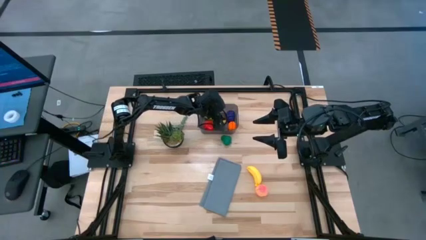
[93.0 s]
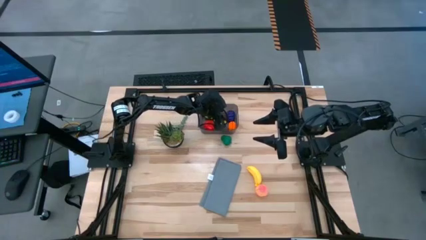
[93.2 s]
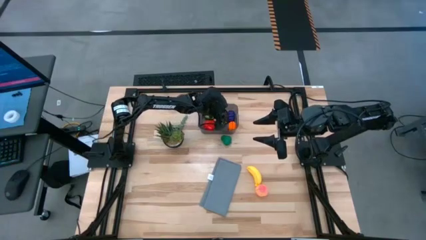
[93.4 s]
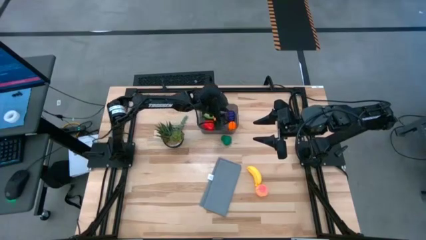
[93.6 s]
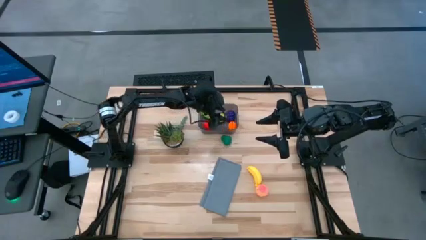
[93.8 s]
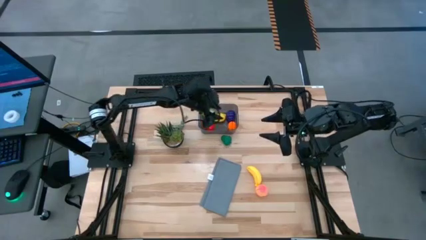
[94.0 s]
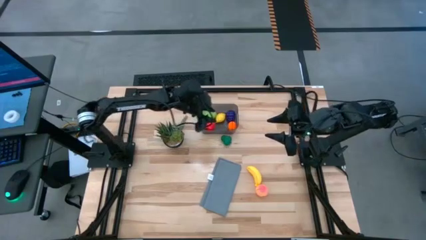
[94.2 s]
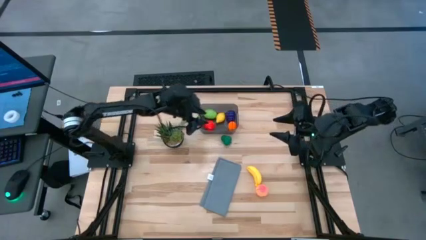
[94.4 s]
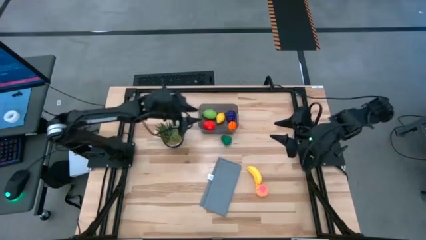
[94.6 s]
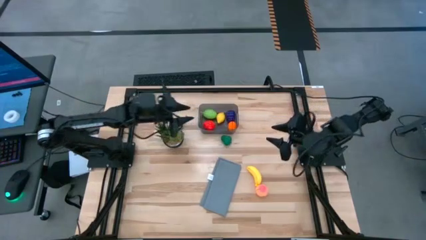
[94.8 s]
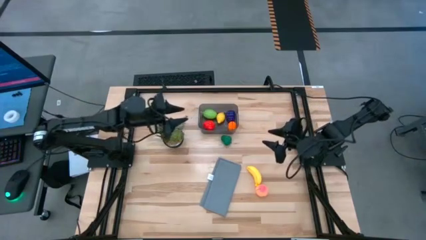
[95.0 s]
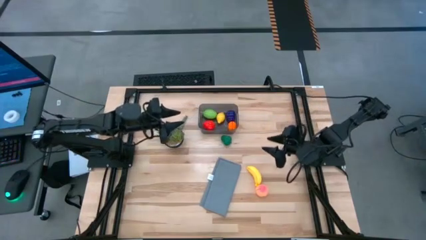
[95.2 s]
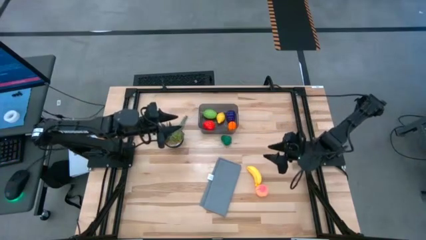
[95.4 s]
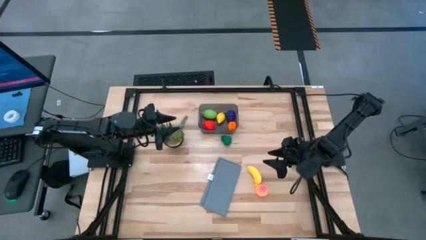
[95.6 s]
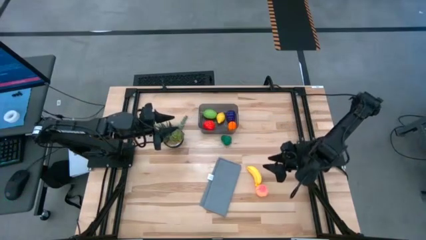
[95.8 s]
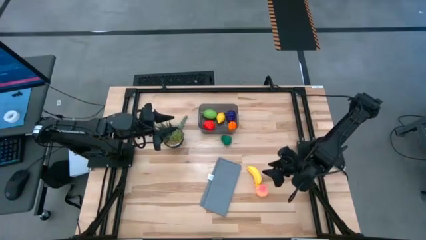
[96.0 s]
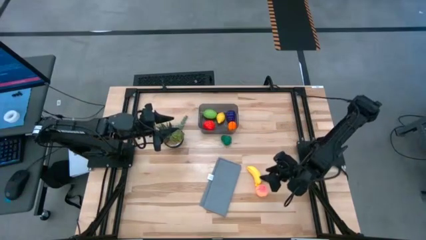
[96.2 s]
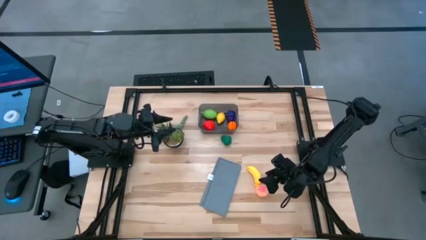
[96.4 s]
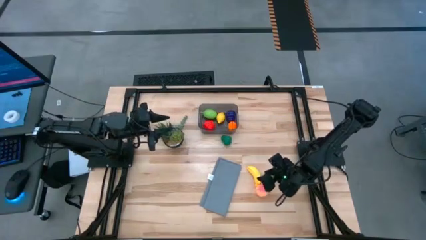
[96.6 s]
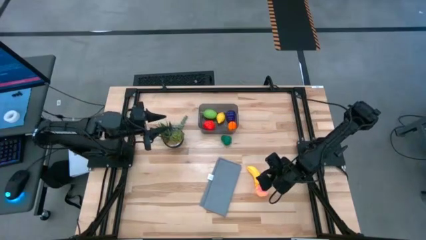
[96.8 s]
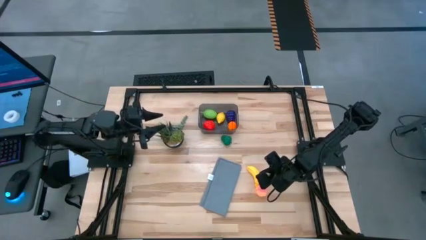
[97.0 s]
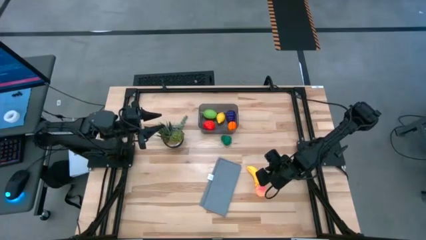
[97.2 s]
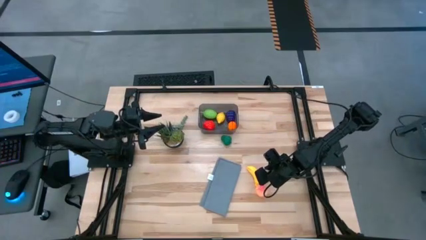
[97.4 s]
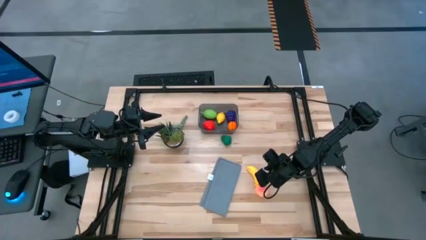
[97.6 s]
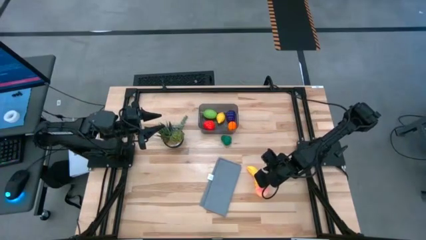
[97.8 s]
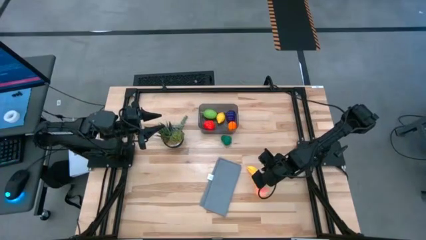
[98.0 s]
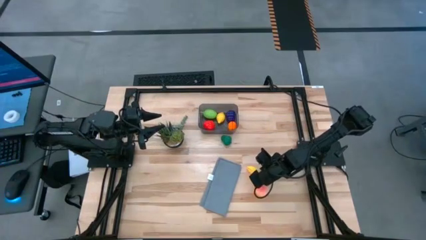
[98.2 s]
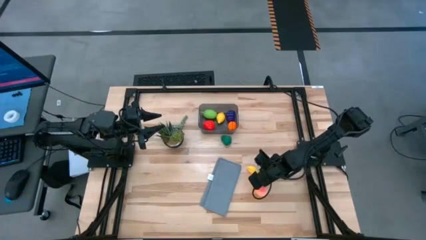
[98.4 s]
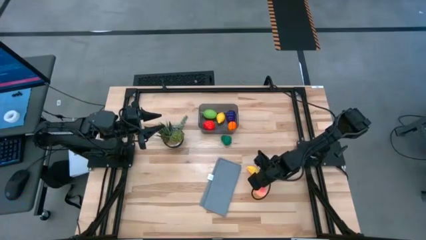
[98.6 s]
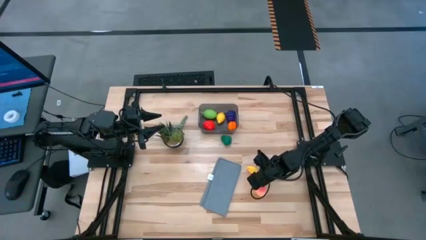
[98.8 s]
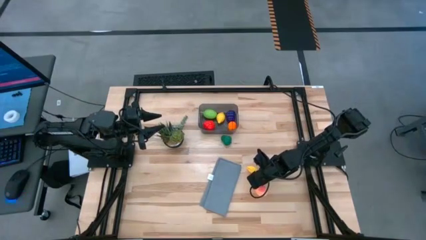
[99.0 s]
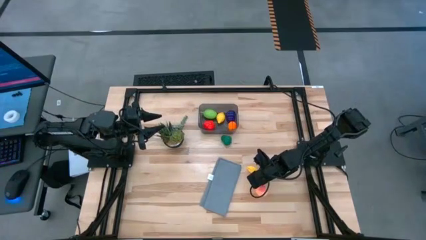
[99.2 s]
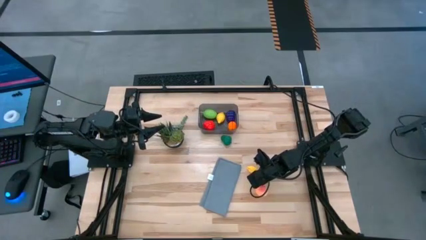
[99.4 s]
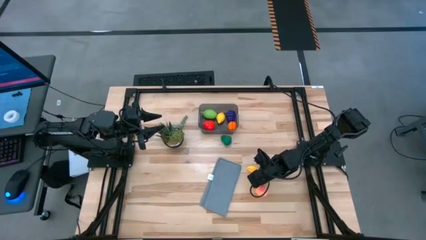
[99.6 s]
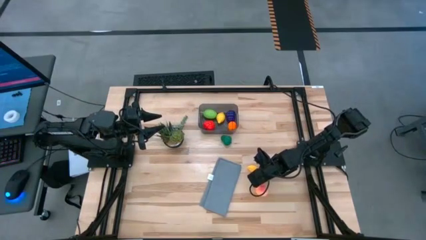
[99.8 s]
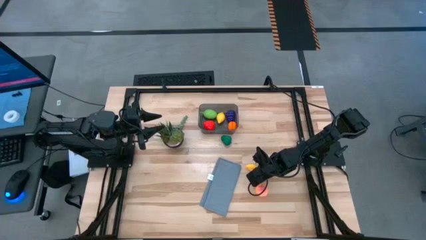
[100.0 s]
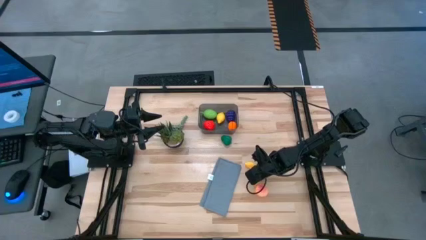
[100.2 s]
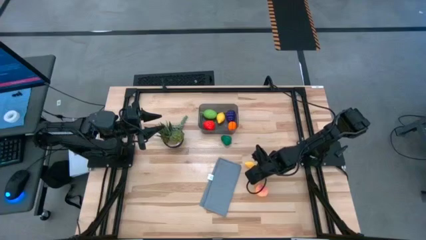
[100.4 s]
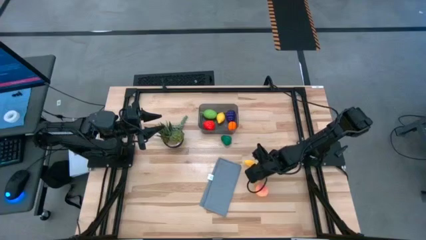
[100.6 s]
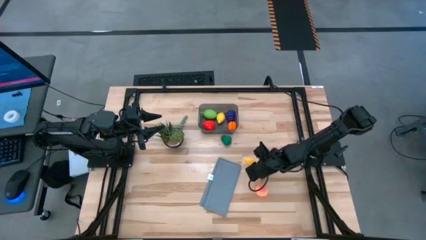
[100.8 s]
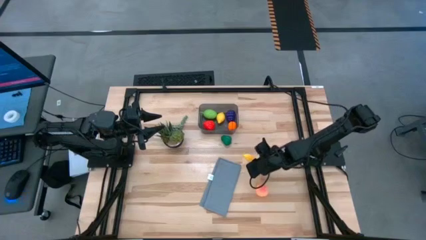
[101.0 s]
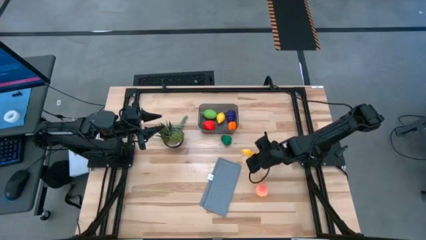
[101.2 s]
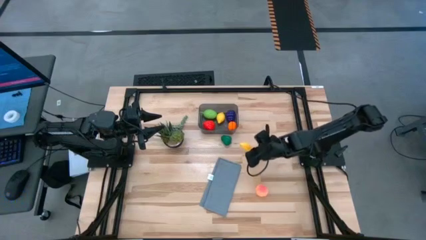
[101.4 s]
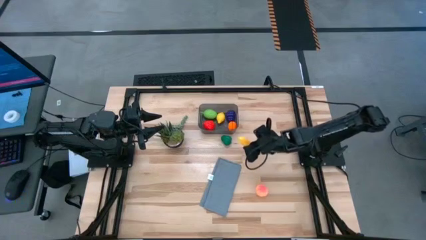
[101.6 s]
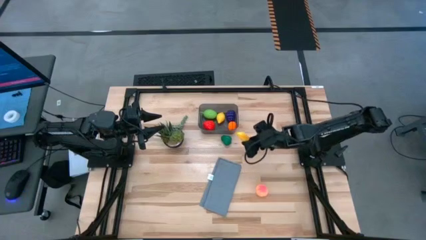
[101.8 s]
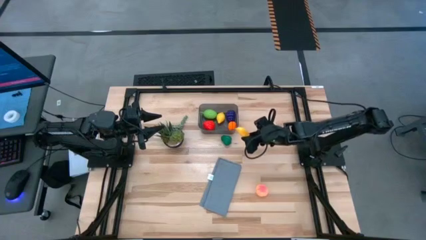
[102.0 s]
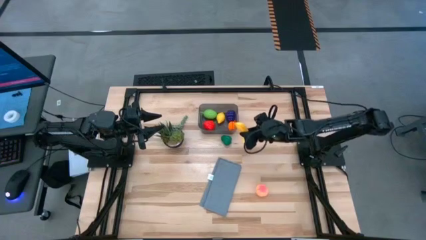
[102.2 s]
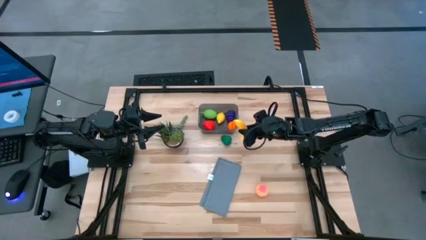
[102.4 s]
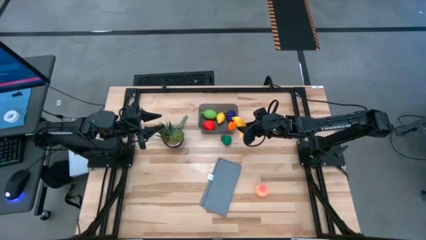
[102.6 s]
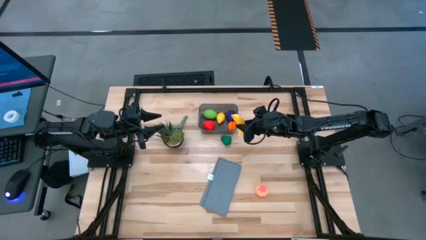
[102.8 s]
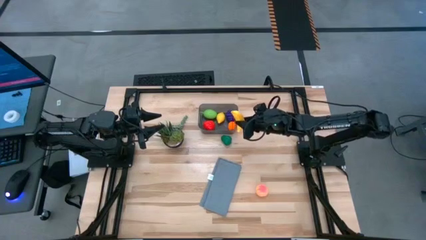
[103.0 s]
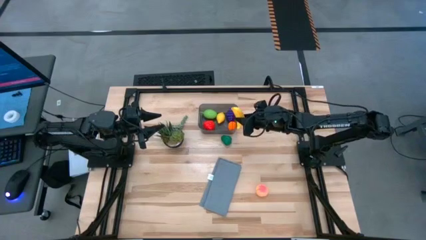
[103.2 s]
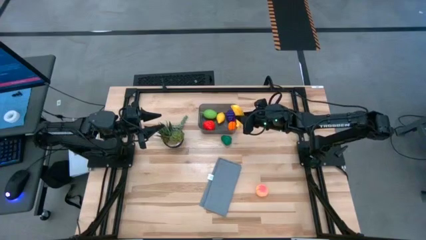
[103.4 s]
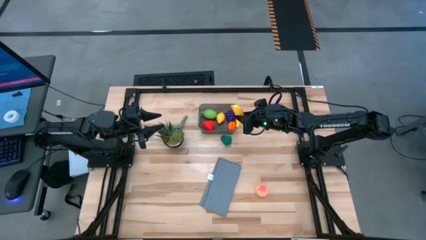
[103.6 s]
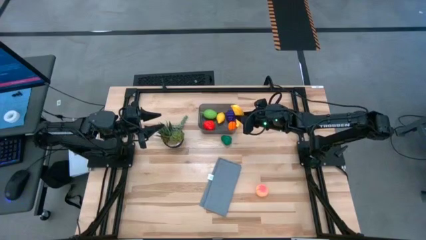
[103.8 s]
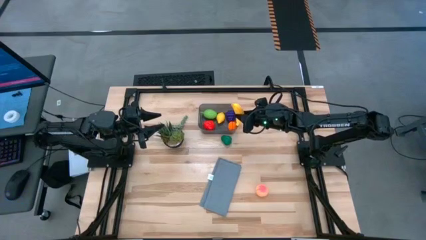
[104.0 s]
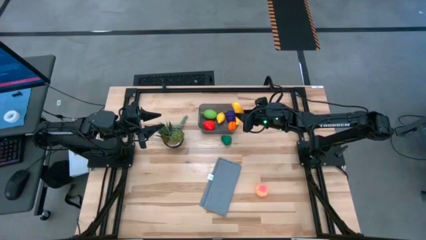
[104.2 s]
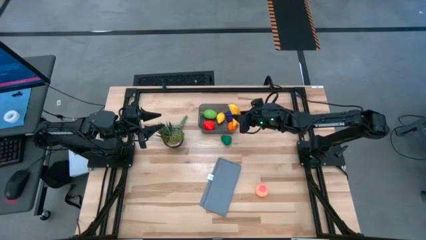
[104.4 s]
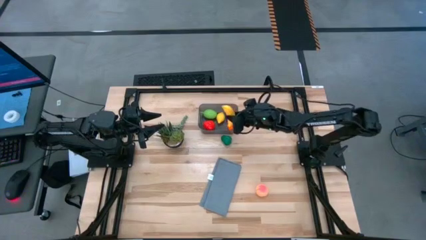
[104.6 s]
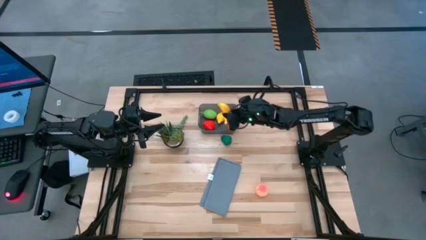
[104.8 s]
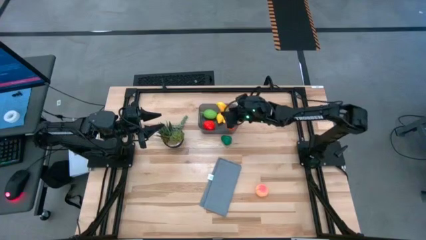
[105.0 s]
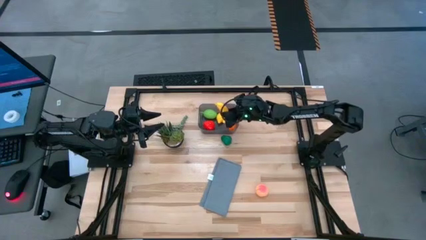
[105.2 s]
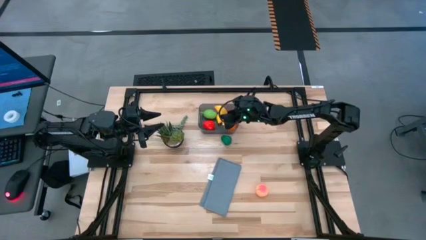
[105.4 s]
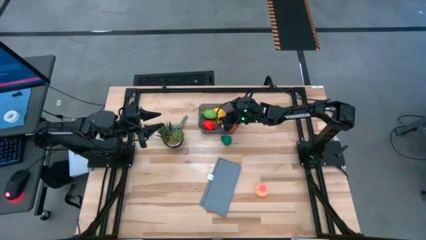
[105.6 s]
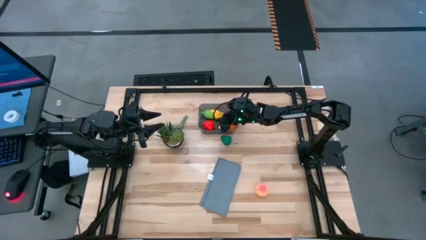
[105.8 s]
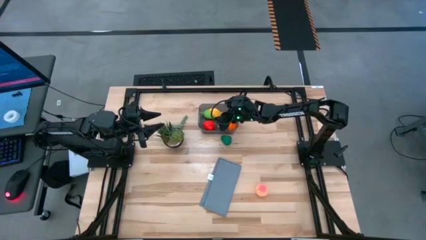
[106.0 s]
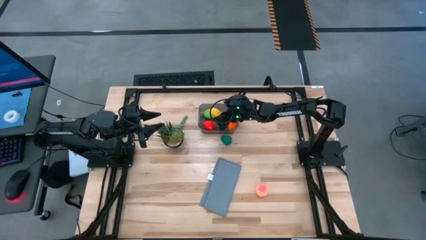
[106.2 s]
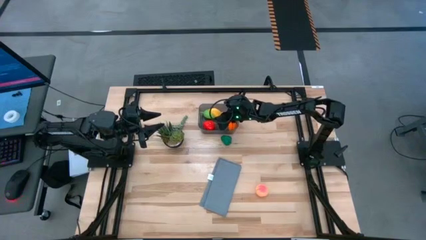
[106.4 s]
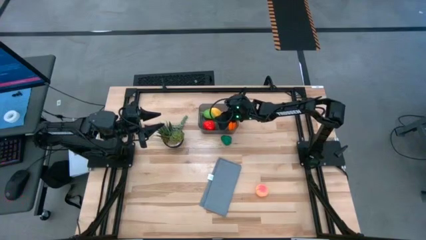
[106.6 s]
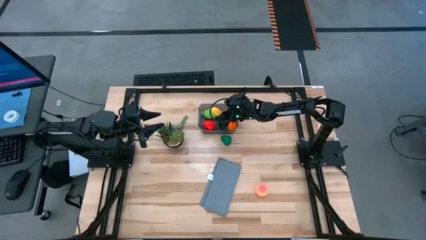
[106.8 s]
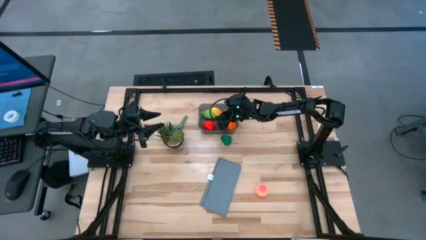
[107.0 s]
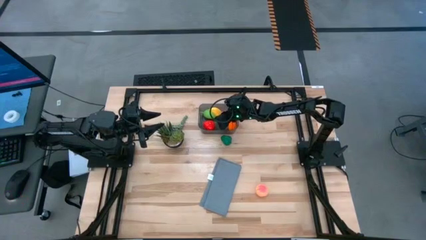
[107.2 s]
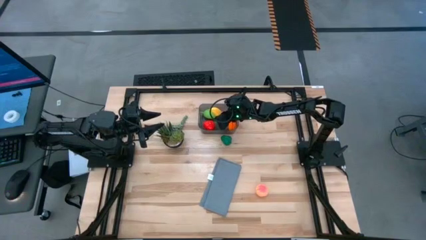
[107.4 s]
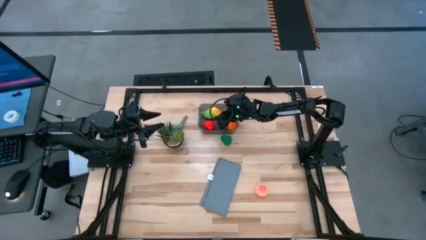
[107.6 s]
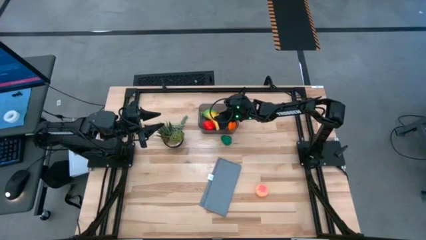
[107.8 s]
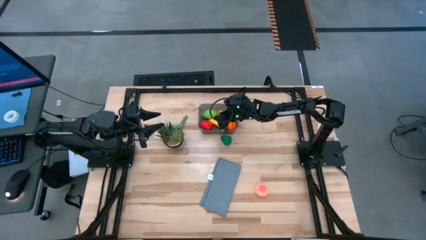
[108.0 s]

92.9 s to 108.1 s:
Task: Pick and placing Produce into tupperware
Put the banana into the black bin

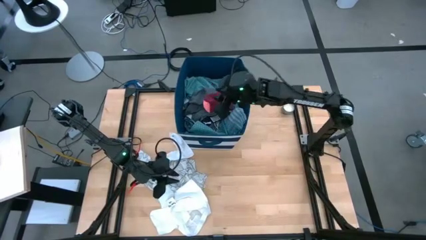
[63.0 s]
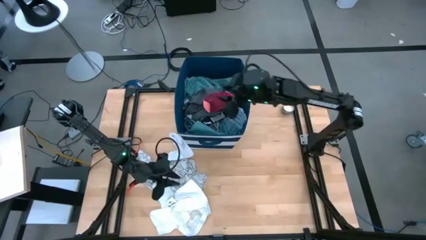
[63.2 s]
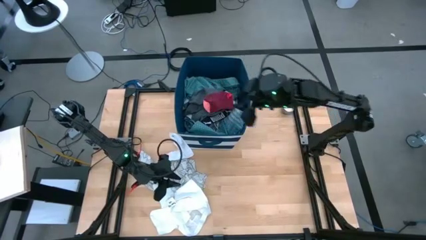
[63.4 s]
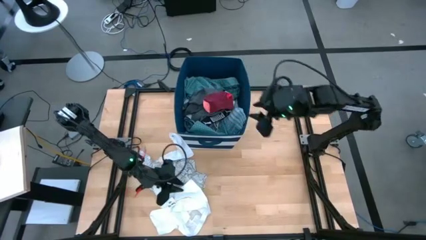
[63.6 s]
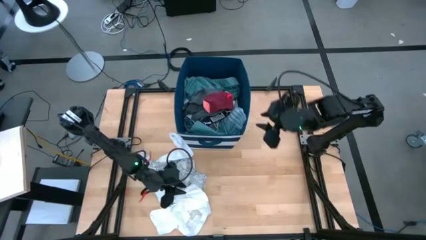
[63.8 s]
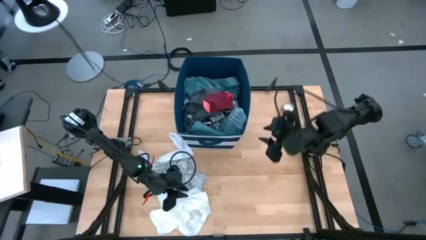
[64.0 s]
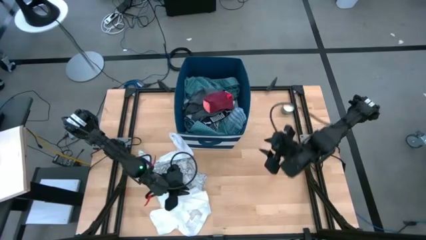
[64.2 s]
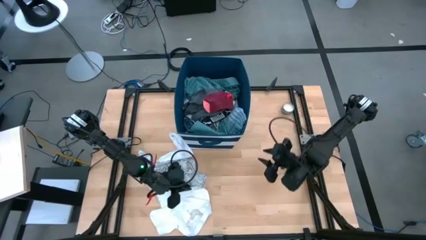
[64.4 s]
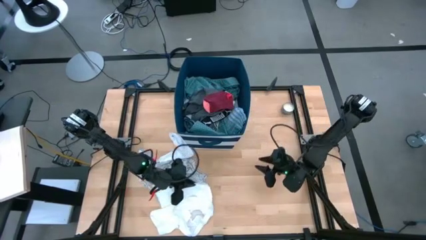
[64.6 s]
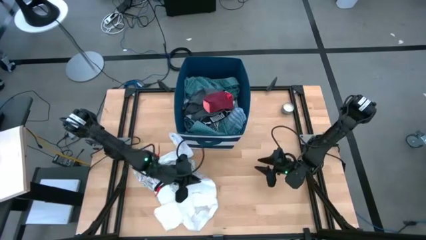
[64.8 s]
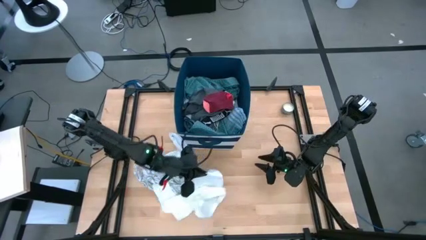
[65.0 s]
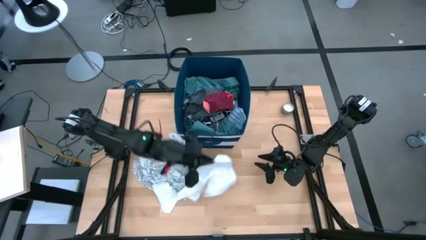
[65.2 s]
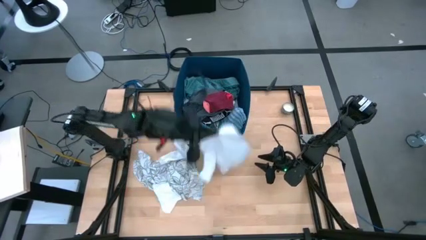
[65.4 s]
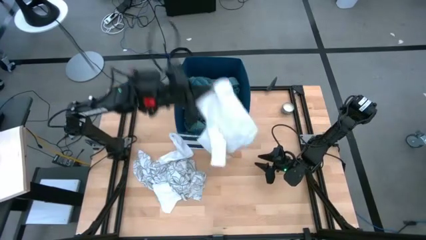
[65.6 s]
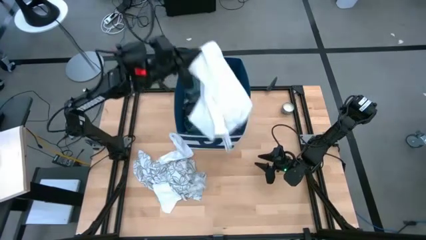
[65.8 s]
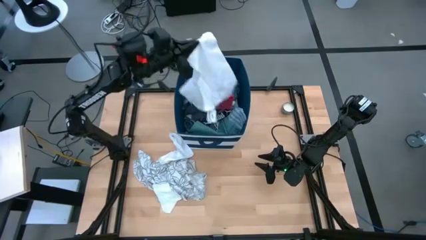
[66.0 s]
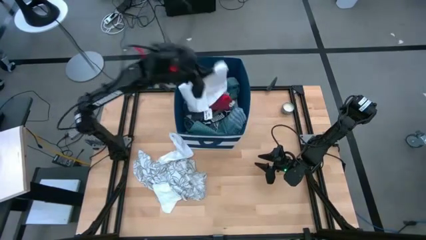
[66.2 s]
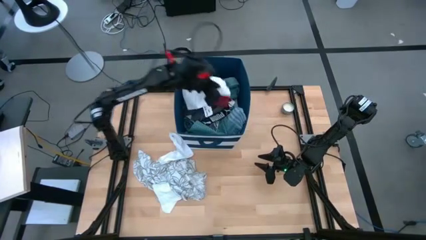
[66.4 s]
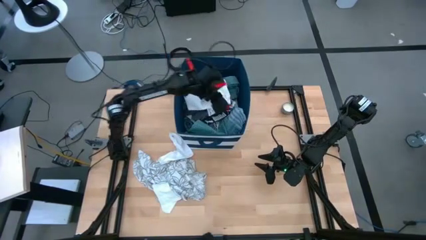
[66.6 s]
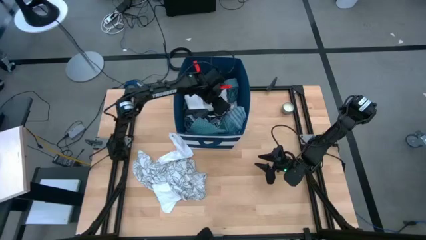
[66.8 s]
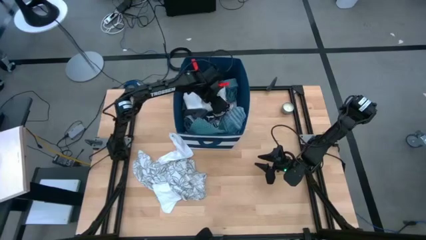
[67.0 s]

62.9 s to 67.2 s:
Task: Sort clothes
Put the white underwear into the blue bin
